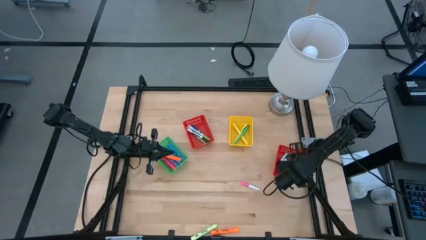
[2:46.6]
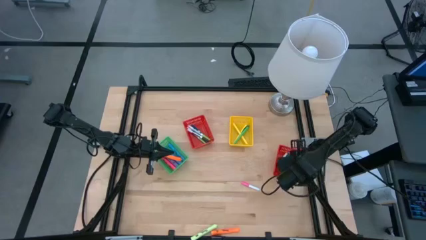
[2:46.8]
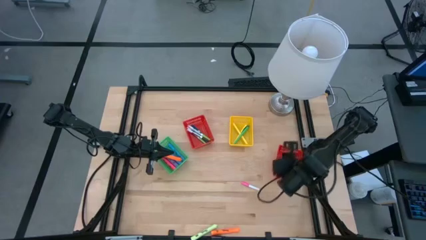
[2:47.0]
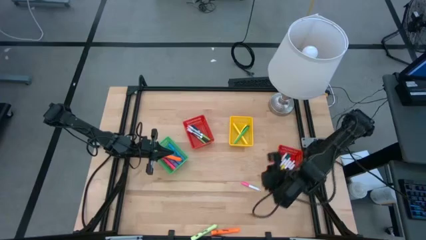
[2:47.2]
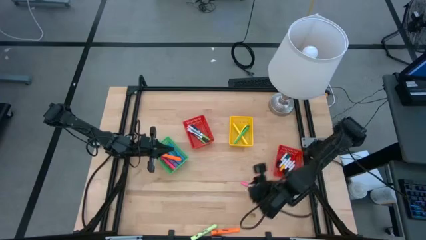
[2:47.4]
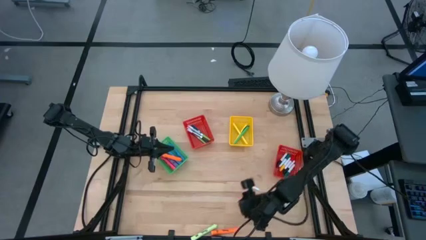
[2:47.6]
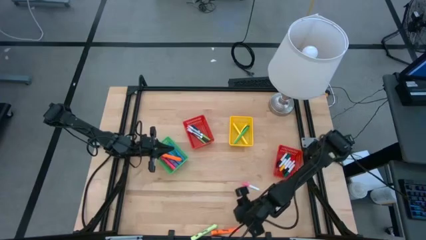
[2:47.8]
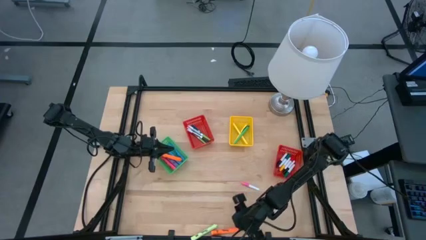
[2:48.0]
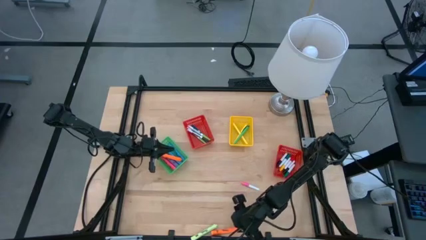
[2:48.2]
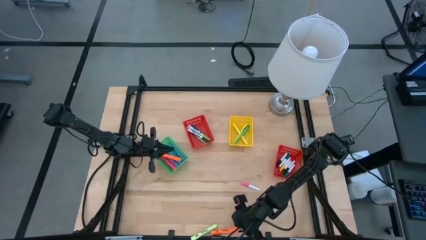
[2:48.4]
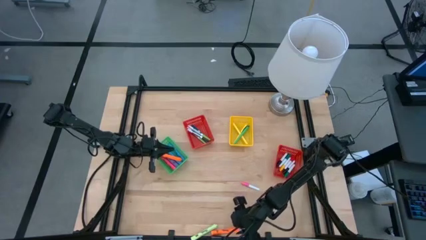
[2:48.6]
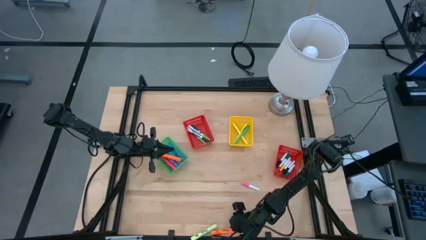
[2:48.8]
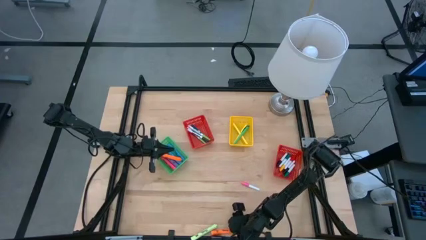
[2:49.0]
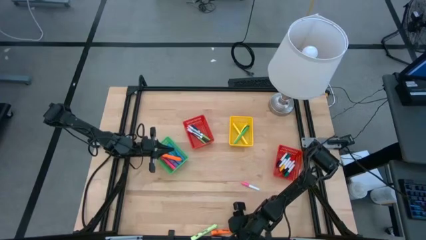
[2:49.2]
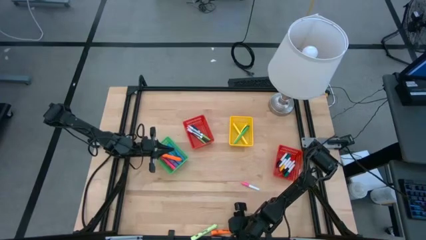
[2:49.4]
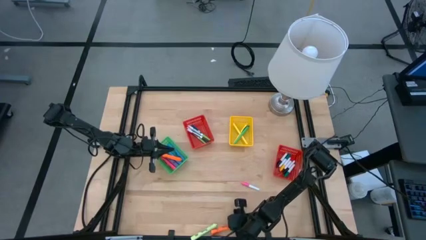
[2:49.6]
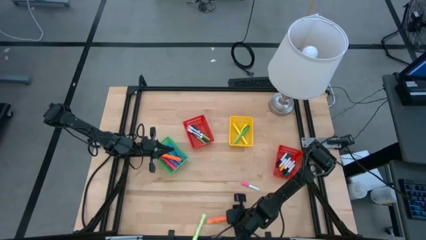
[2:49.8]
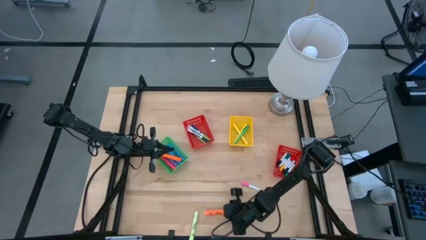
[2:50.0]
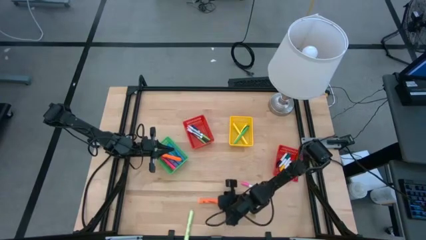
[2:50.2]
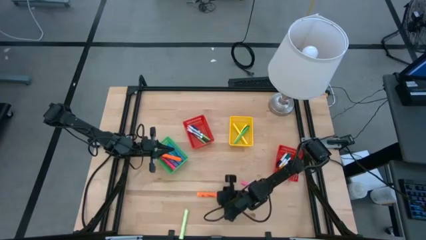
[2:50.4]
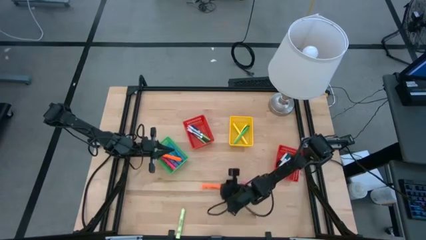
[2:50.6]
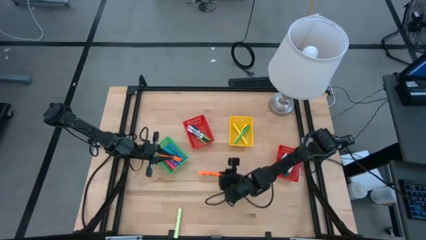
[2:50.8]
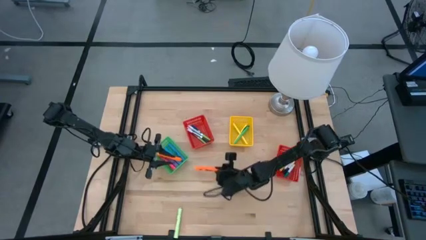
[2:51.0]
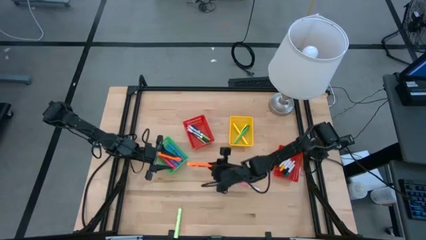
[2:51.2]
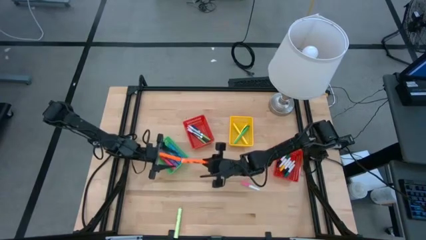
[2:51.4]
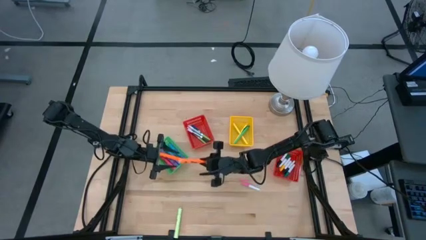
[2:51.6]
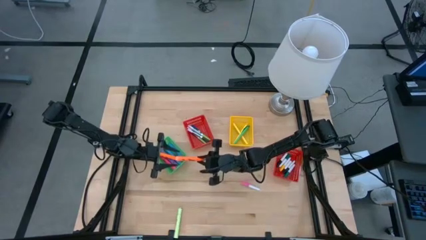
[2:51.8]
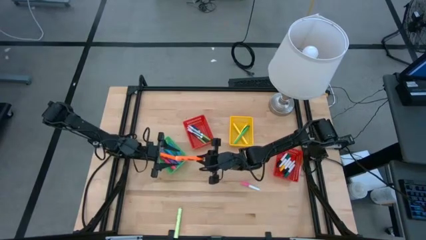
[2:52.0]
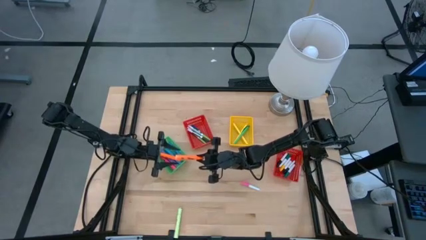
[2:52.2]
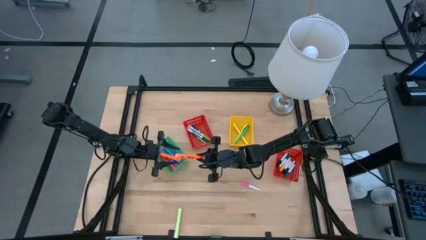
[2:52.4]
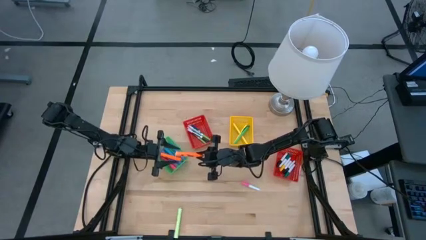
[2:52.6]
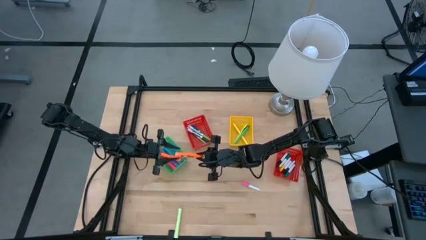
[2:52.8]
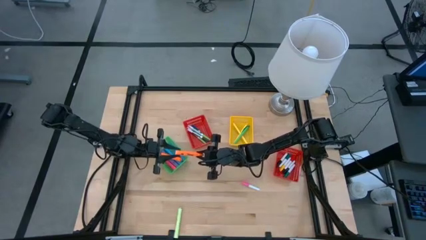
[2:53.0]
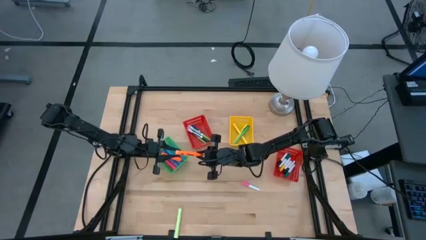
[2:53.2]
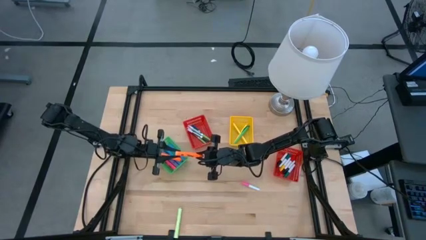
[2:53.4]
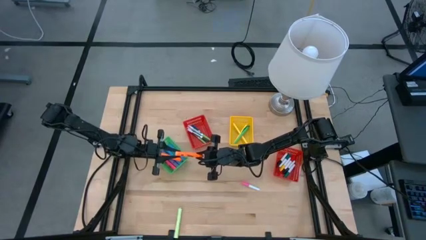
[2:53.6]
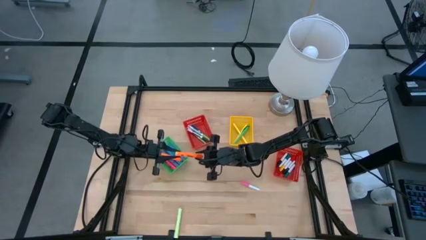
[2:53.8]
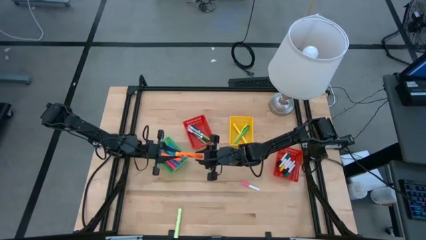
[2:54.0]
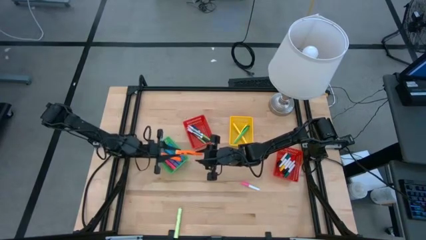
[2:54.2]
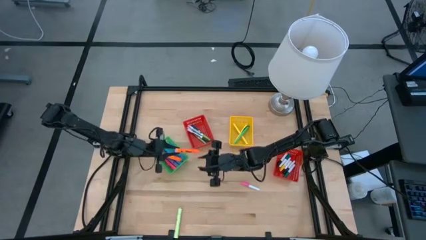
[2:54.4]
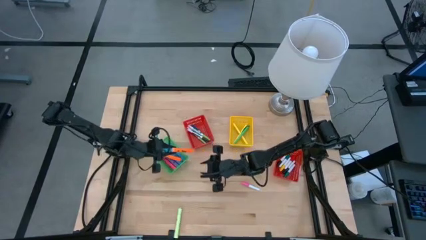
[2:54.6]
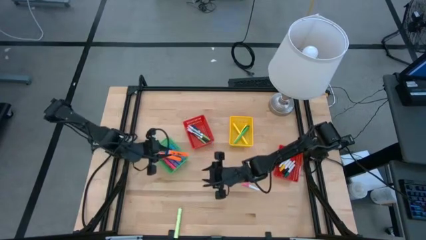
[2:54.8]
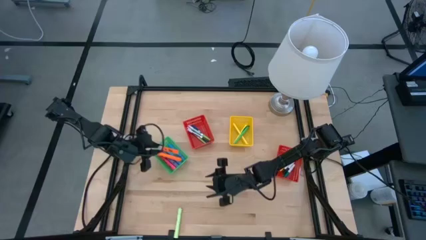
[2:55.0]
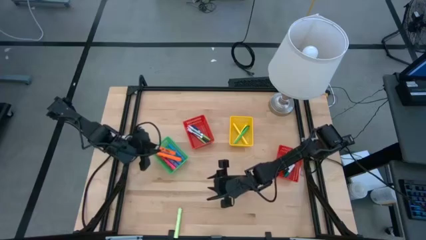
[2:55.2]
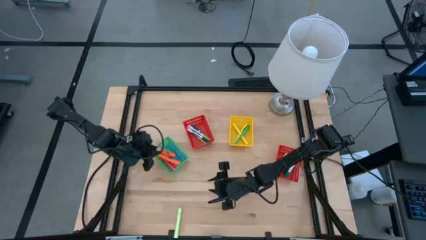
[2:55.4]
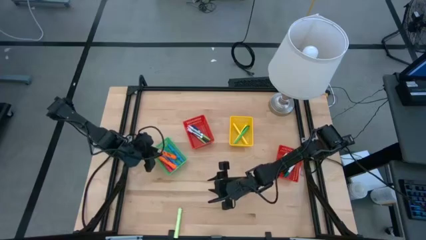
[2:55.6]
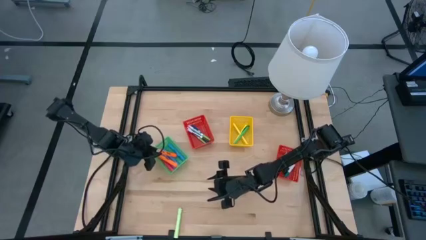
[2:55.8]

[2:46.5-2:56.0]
Task: Pick & Place Markers
Put the large orange highlighter pen into the green bin

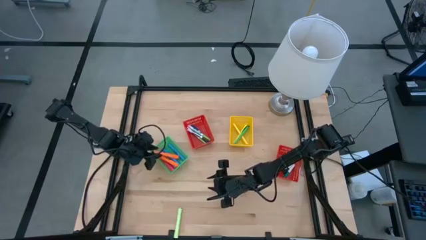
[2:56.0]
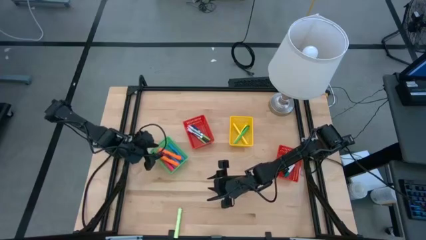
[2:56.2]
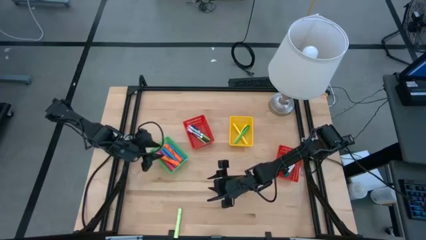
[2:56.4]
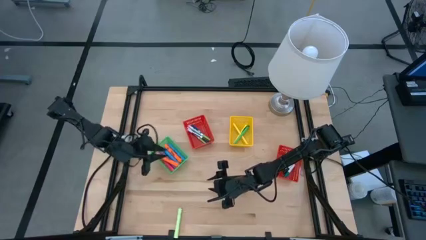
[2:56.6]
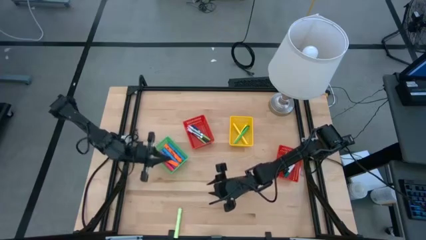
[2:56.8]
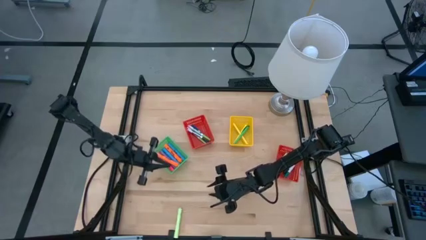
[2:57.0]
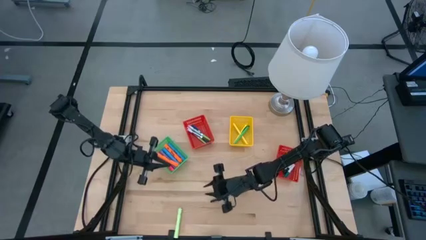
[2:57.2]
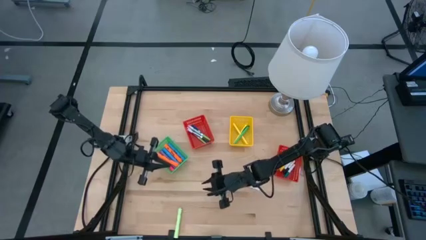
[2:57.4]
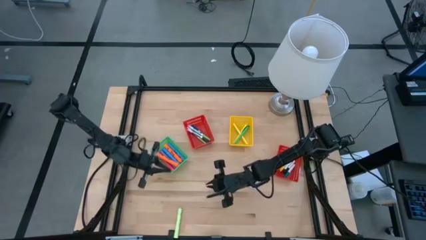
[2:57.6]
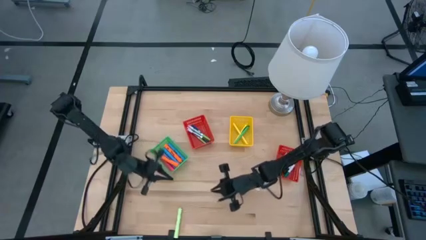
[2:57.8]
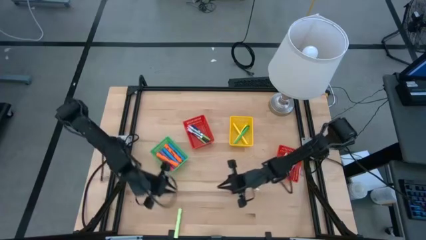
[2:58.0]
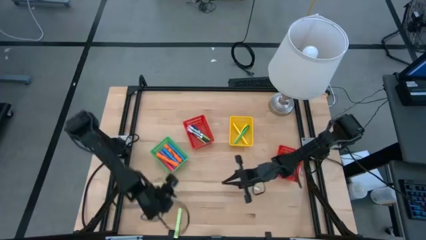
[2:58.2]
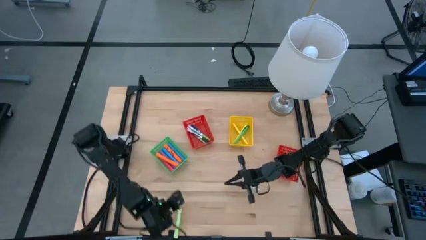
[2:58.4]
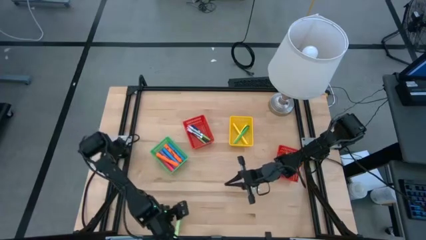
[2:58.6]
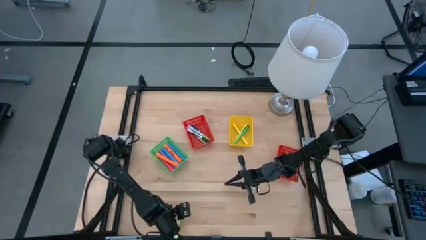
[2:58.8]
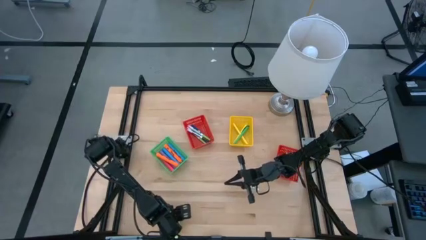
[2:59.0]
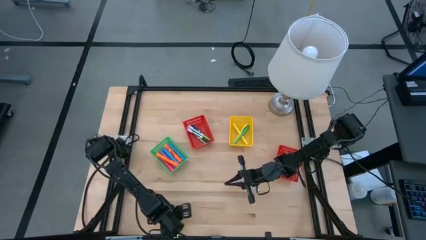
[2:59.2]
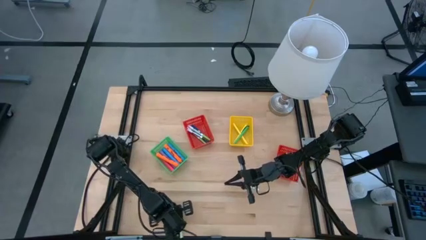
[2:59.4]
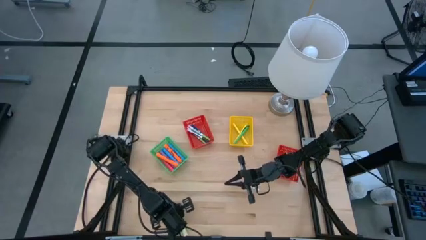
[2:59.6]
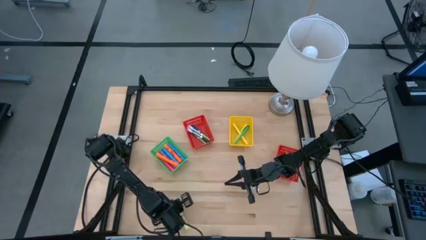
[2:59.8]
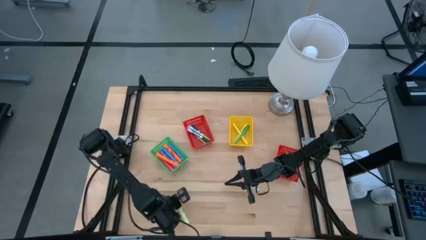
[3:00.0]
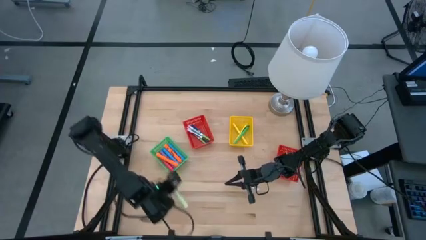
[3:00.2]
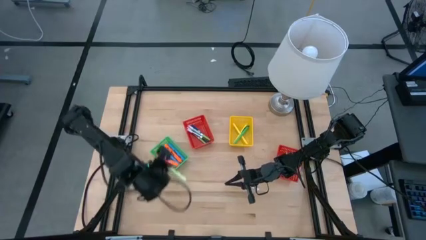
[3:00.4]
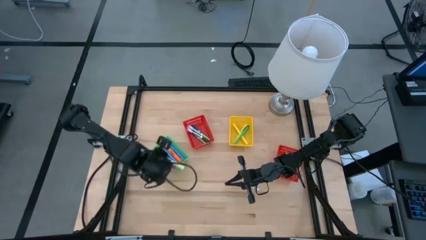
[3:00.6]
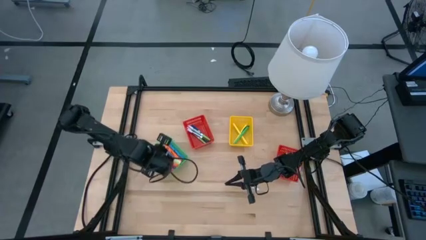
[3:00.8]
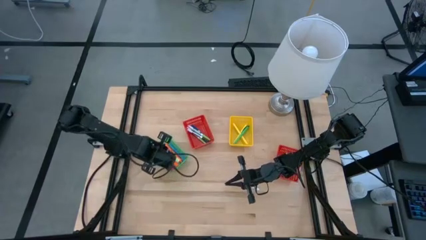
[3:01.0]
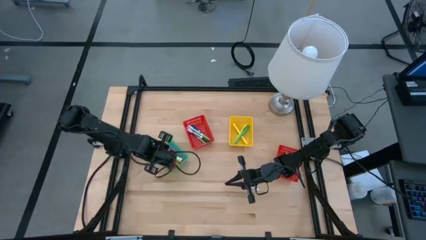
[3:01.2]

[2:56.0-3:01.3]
Put the large green highlighter pen into the green bin
